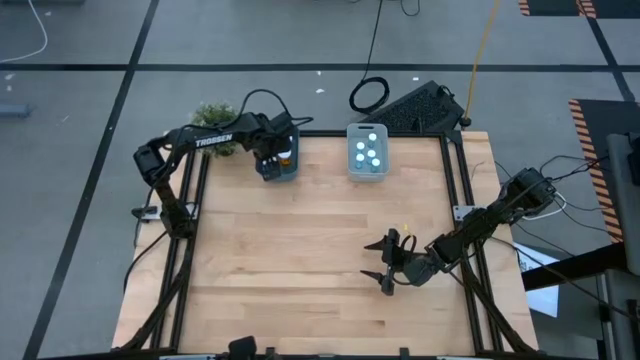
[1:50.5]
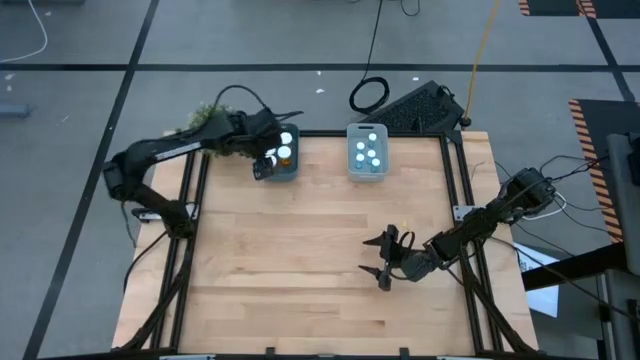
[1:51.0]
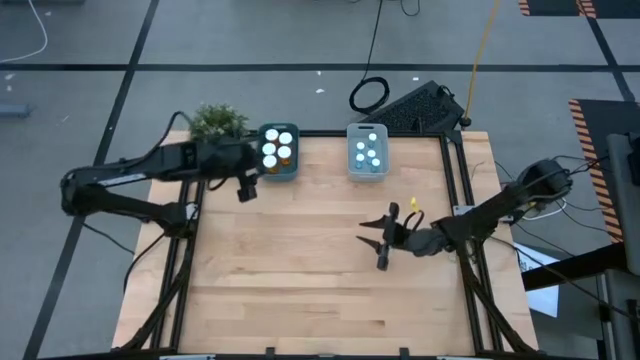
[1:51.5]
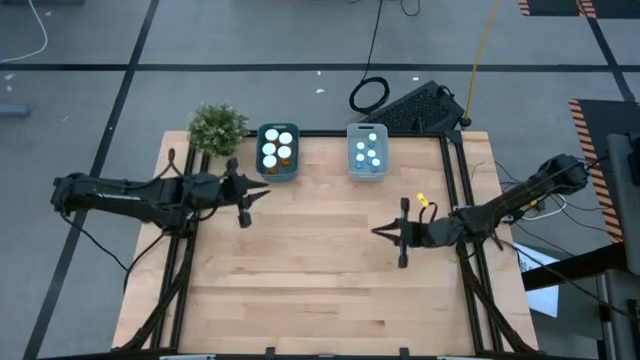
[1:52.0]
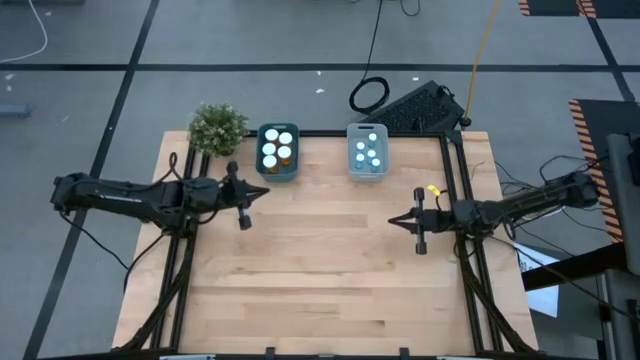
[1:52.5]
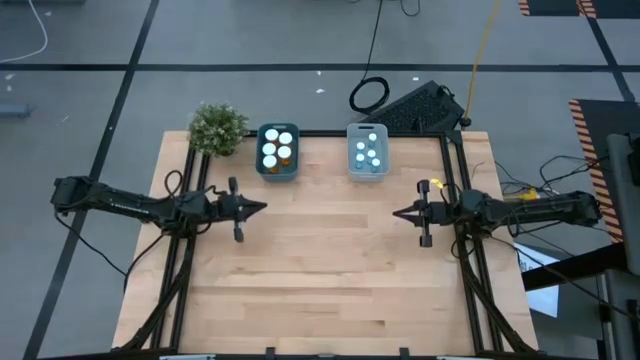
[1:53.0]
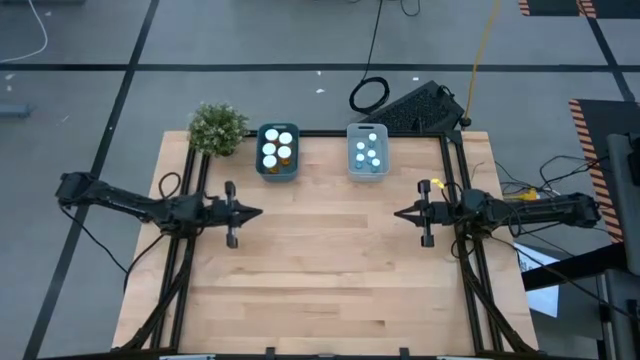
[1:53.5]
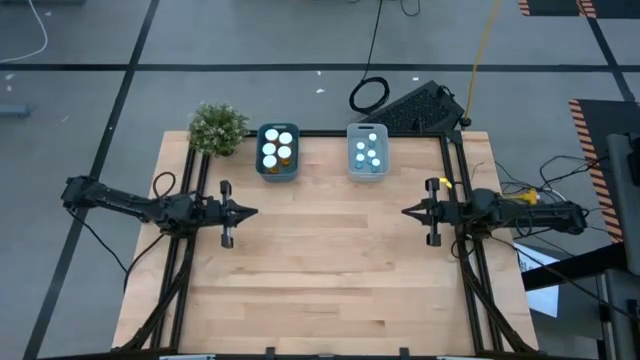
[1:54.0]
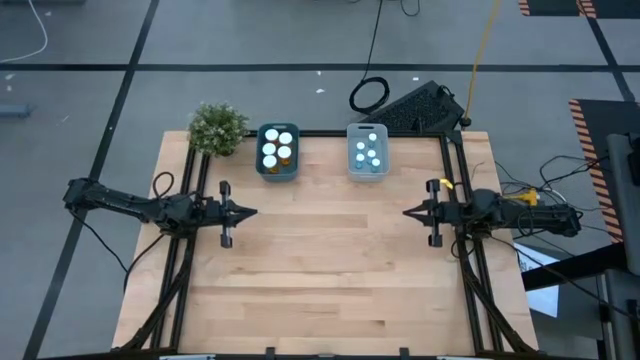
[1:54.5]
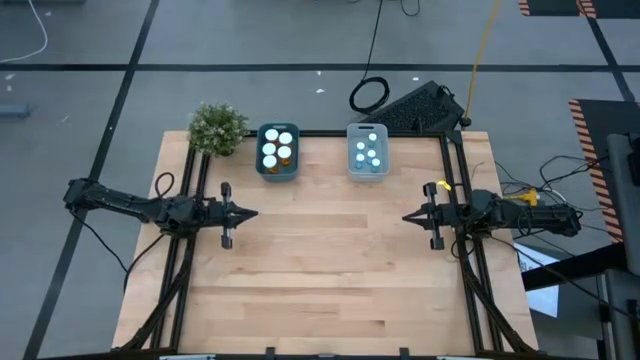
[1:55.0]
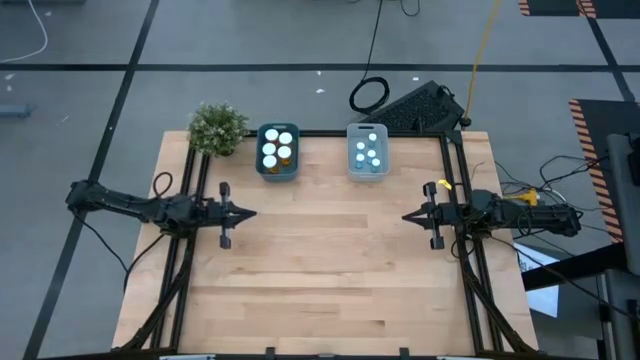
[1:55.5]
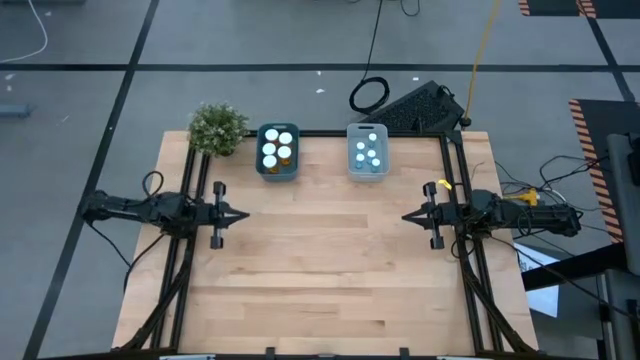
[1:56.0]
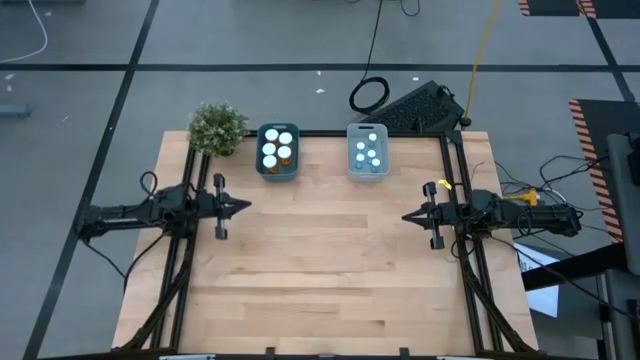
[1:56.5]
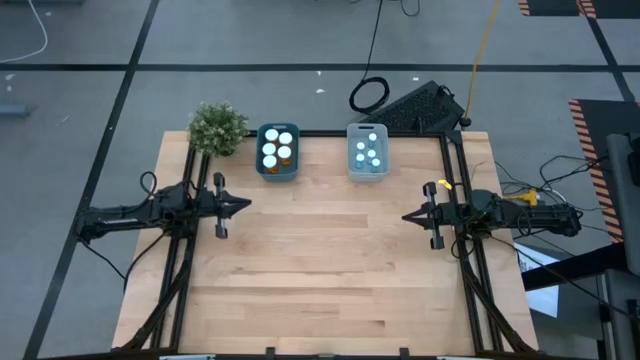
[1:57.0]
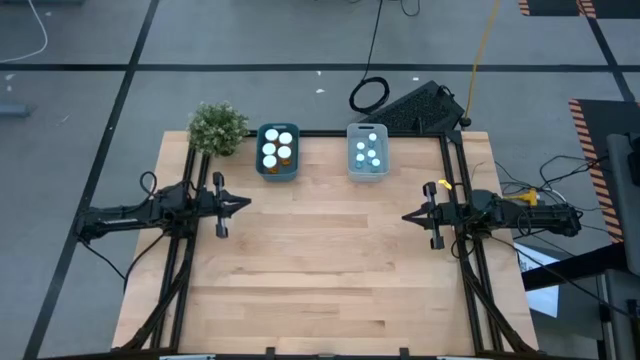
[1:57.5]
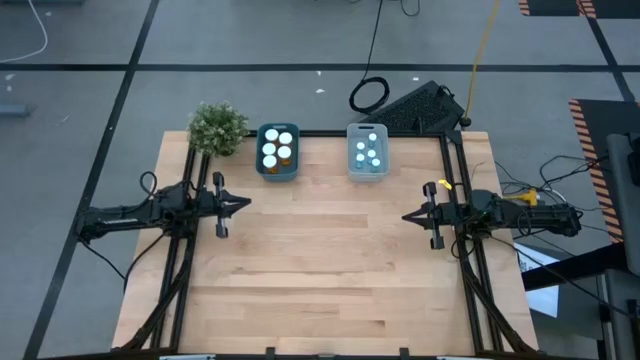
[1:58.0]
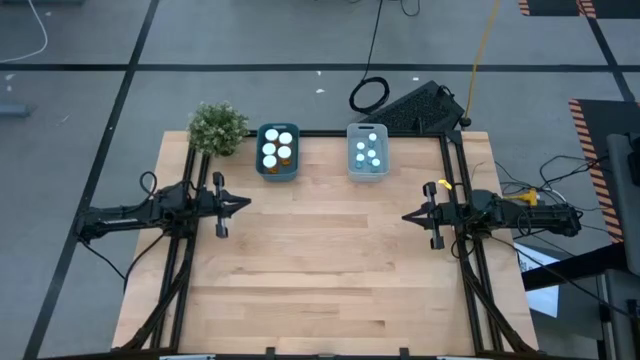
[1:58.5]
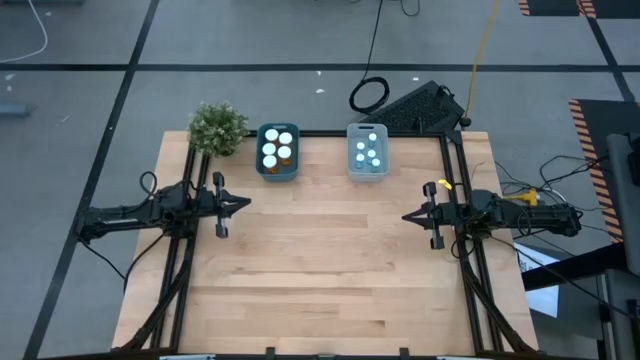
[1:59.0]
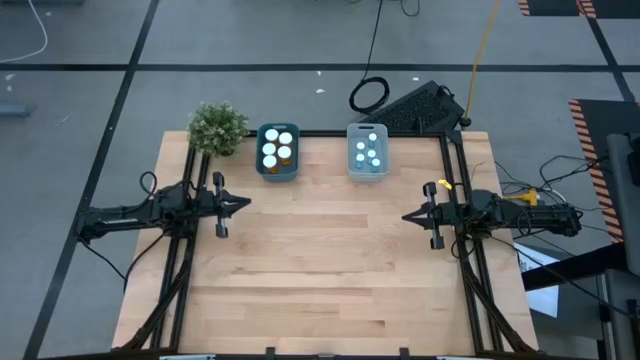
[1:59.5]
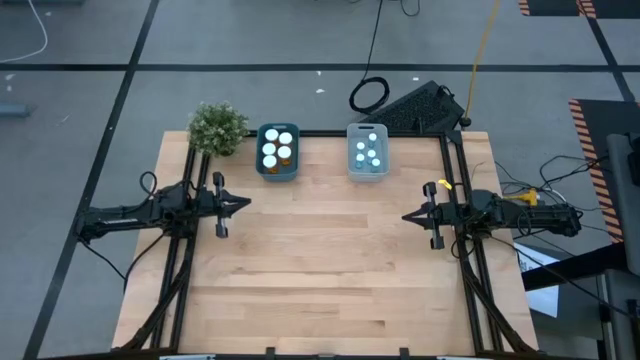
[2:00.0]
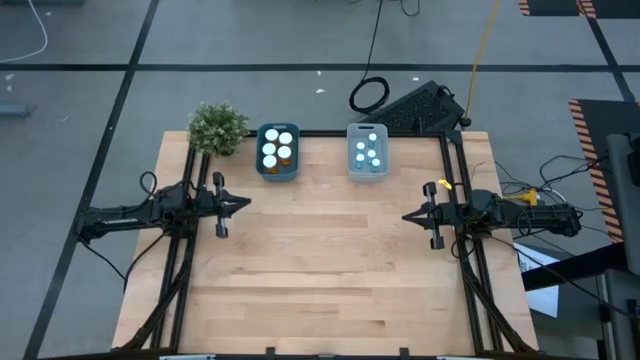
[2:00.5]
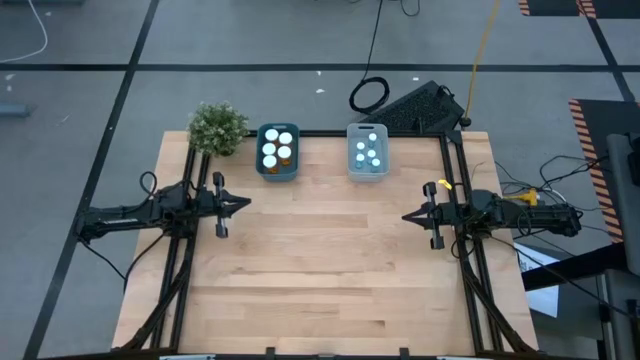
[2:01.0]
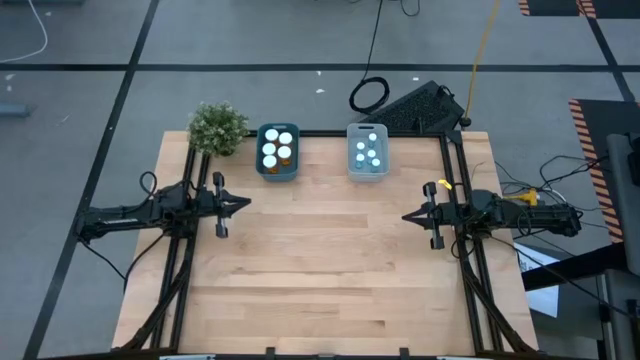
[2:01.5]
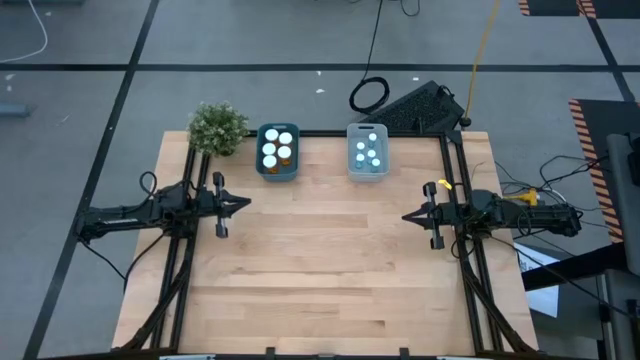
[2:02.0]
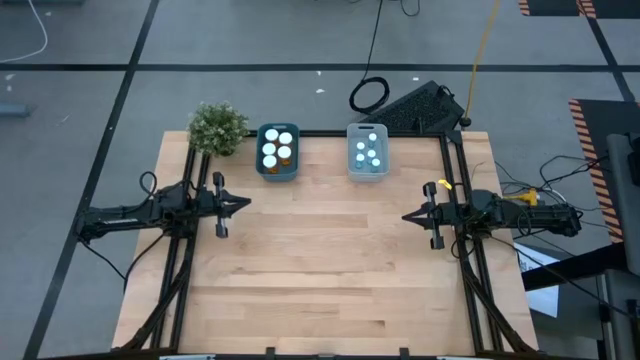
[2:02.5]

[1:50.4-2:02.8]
Task: Pick and place medicine bottles into bin by pill shape (circle, oval)
Return to Home Position

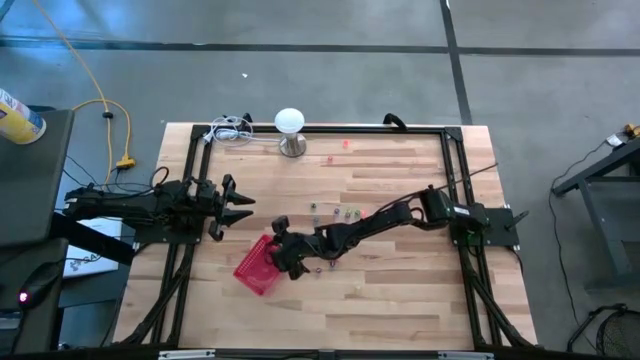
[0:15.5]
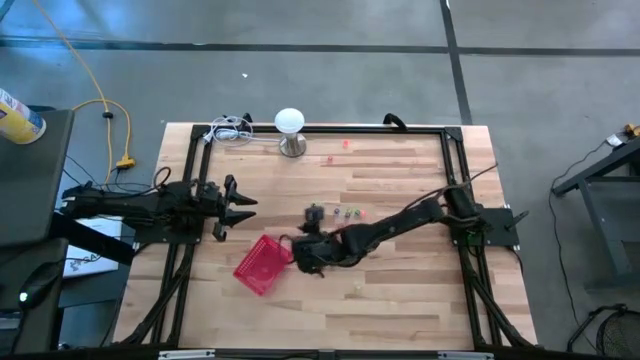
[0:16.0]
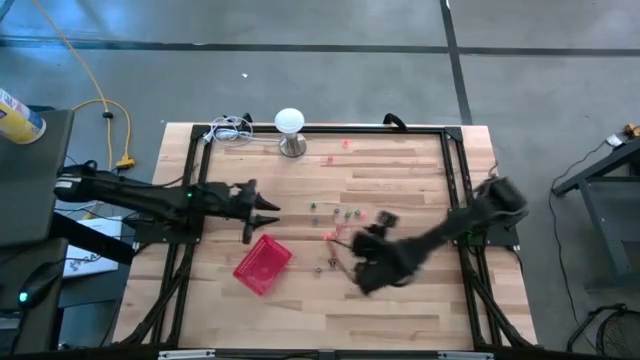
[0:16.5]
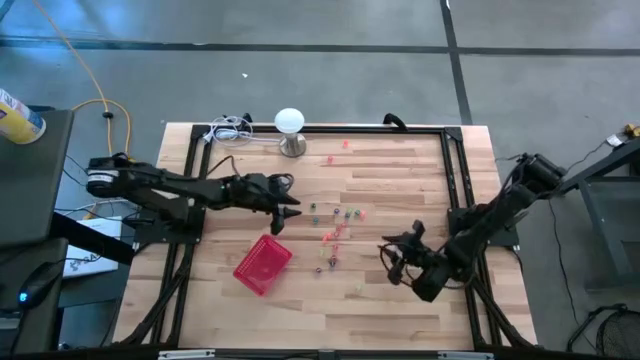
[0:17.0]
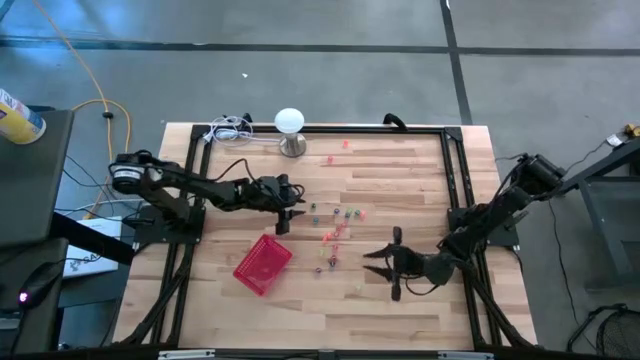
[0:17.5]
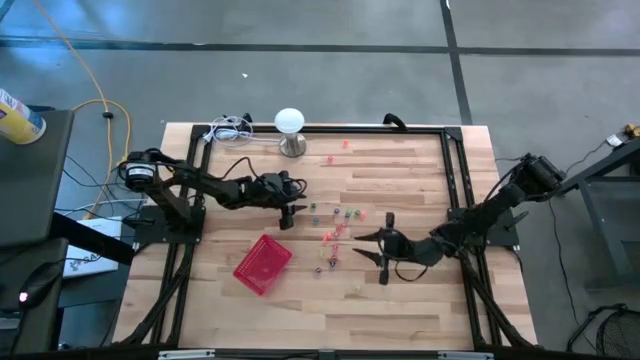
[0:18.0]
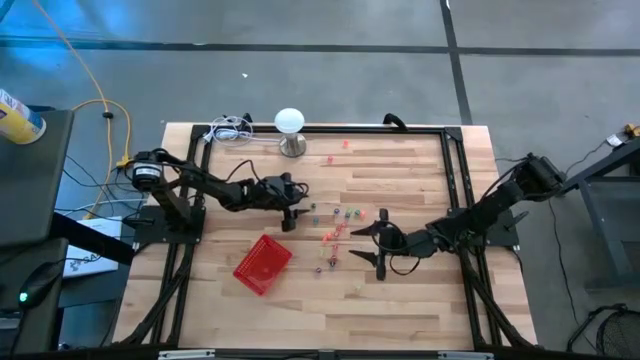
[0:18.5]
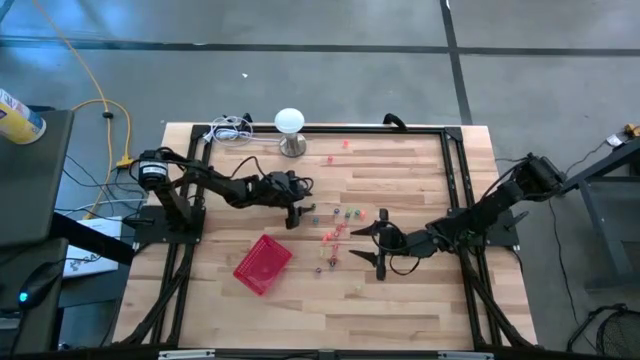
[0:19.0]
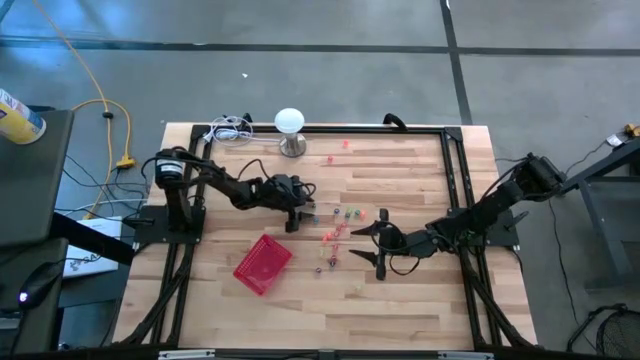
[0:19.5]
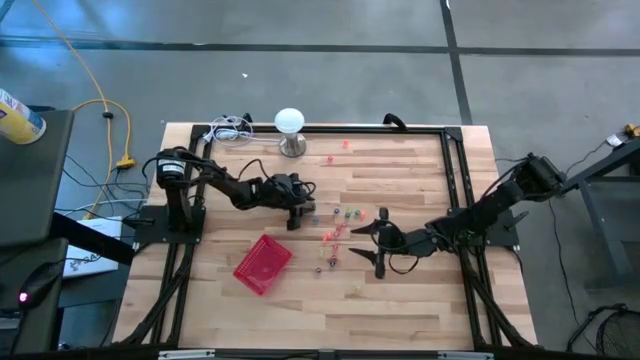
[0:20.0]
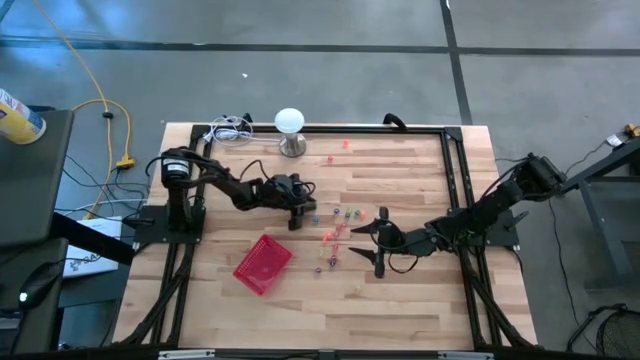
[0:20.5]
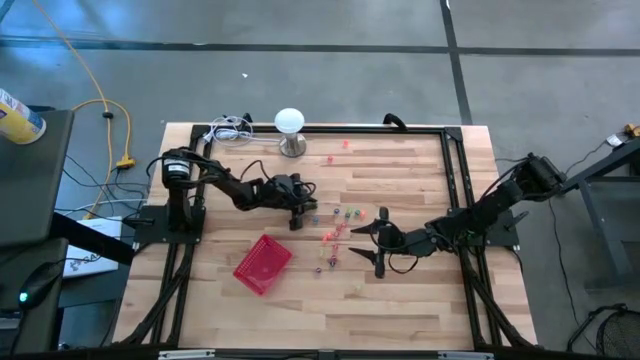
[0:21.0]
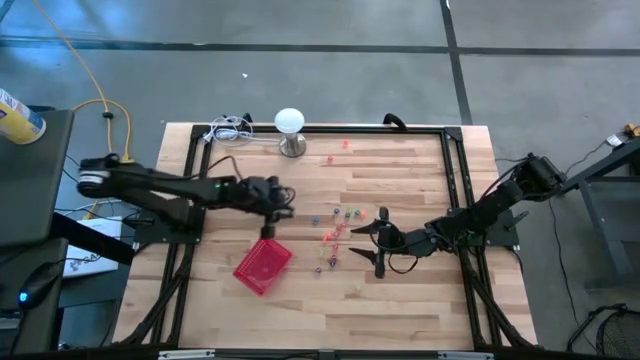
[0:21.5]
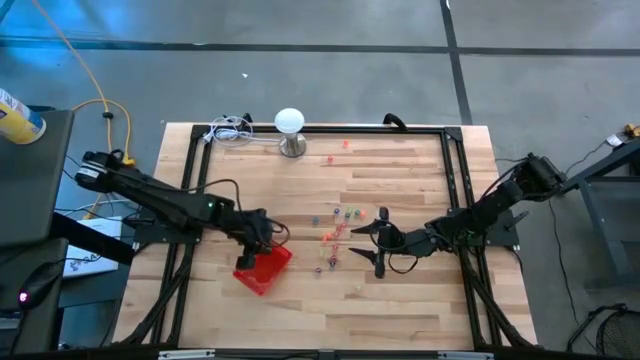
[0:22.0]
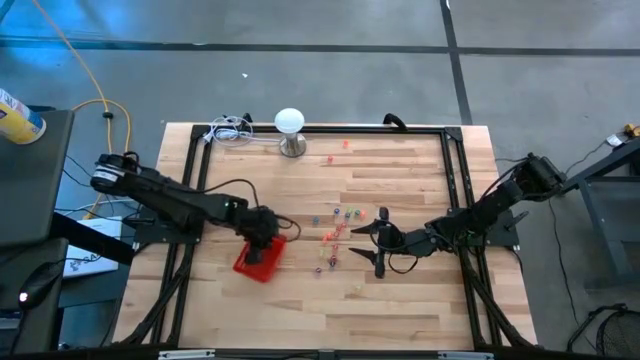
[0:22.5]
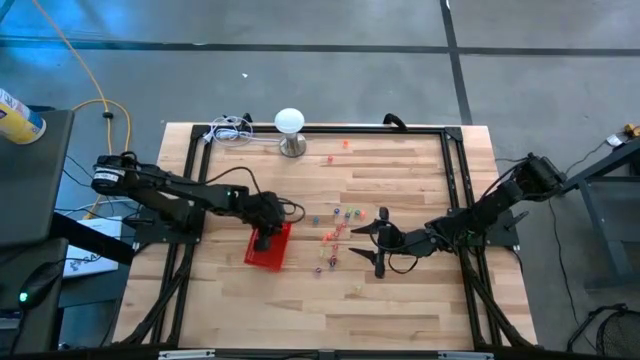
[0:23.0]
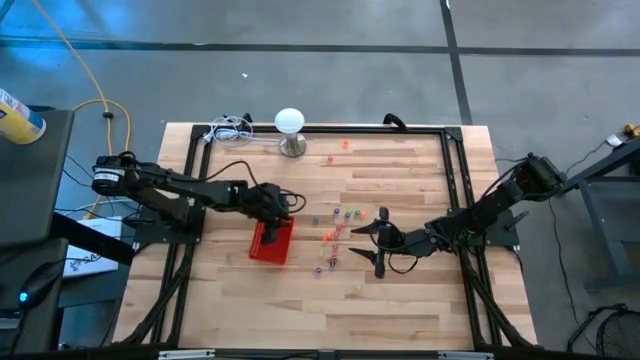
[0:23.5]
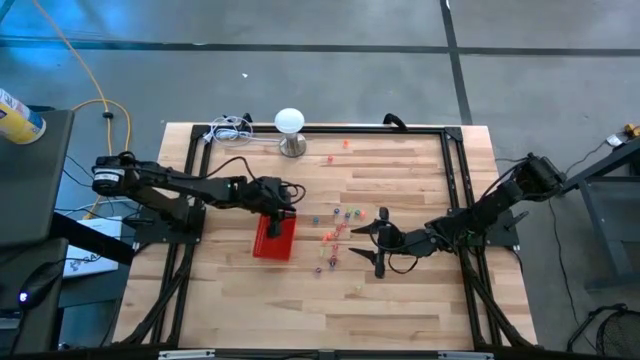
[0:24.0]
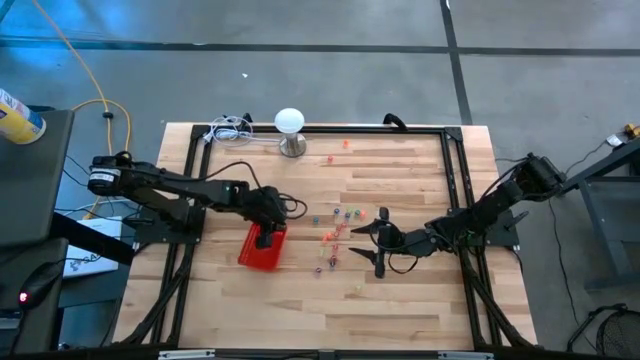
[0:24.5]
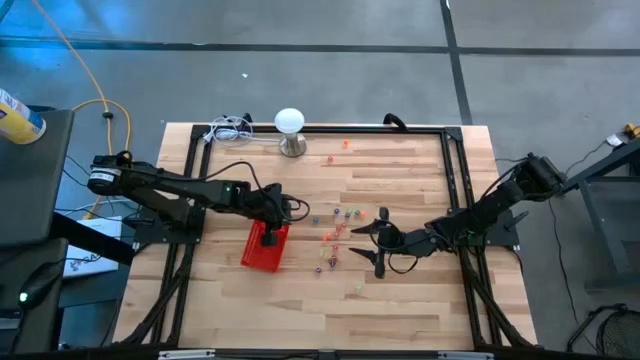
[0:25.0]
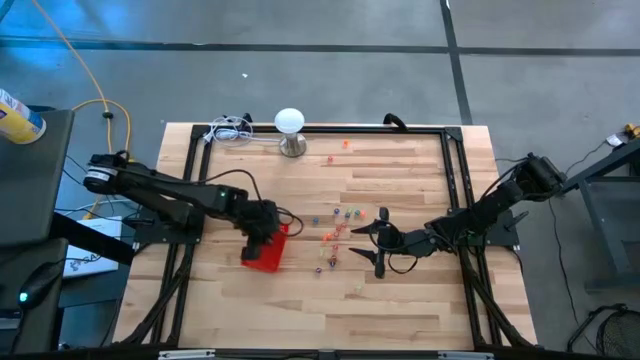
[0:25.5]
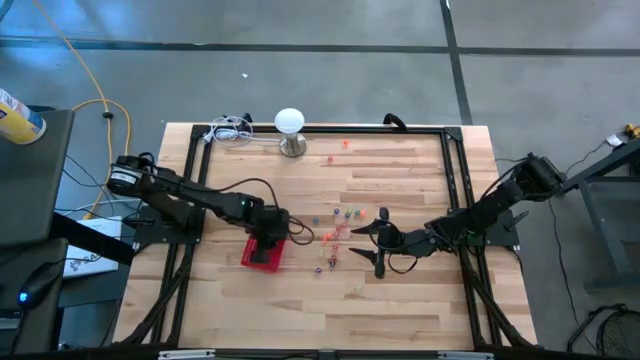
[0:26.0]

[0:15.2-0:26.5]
Task: Pick & Place Dice
Put the green die into the red basket
